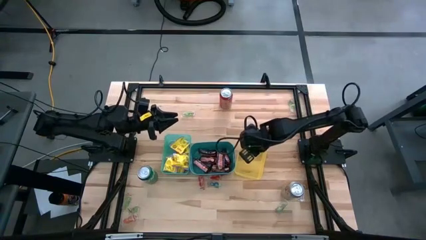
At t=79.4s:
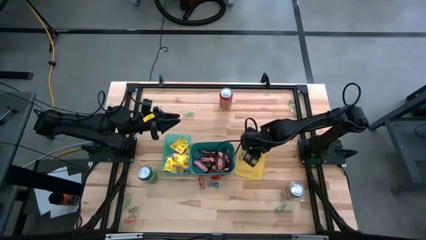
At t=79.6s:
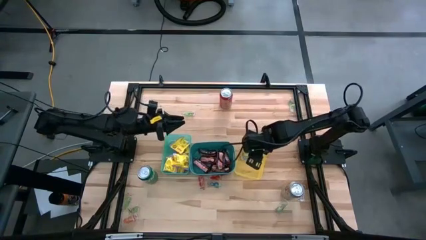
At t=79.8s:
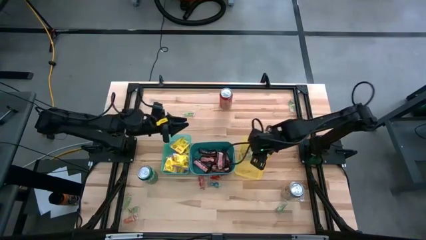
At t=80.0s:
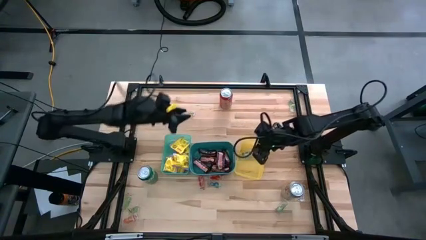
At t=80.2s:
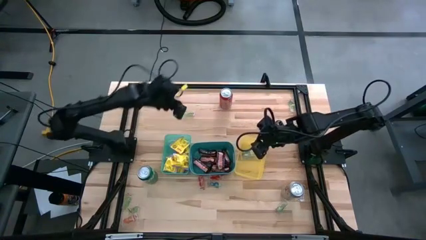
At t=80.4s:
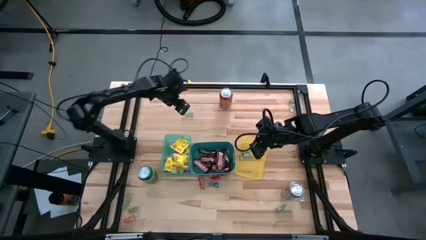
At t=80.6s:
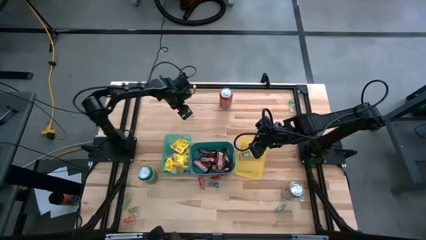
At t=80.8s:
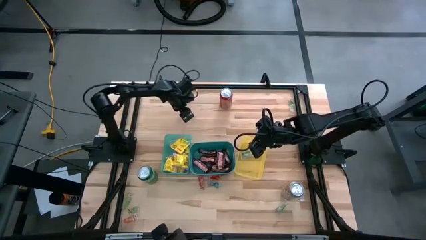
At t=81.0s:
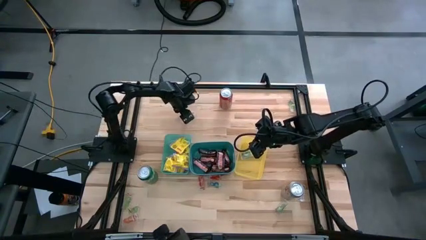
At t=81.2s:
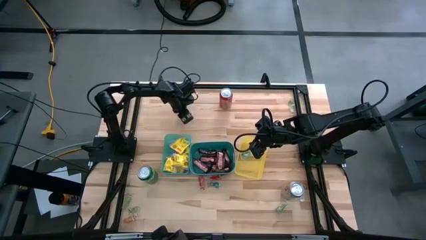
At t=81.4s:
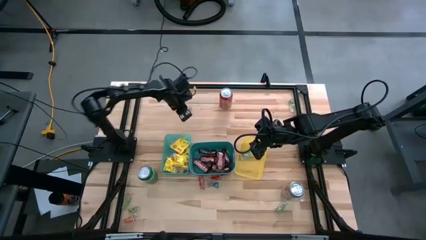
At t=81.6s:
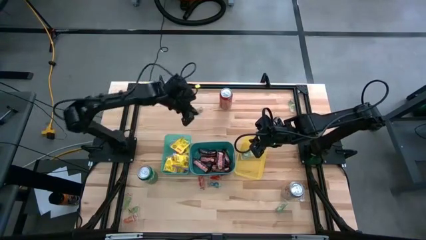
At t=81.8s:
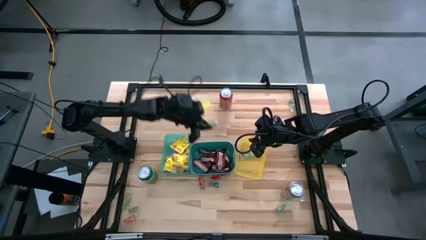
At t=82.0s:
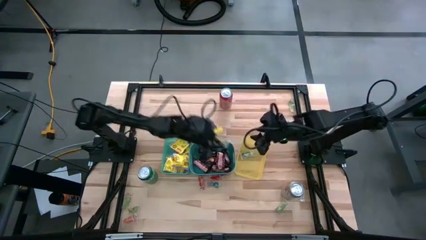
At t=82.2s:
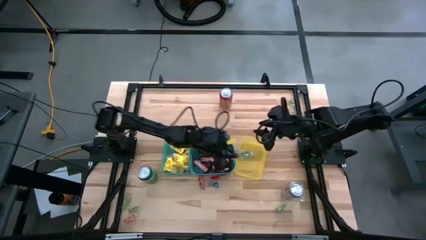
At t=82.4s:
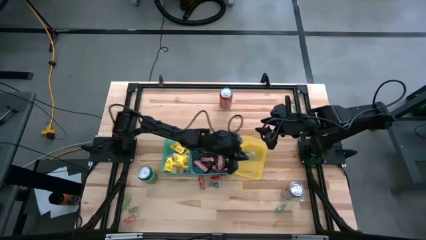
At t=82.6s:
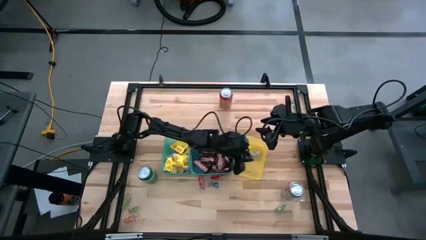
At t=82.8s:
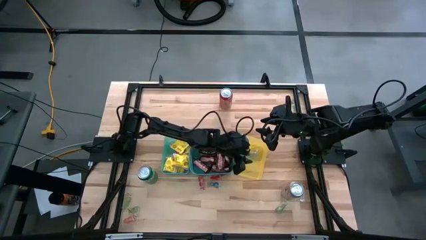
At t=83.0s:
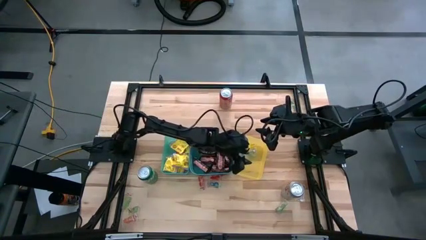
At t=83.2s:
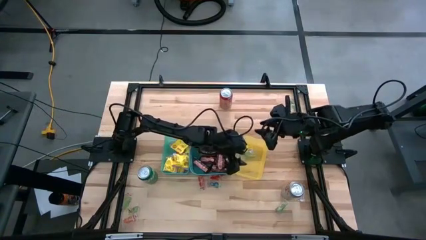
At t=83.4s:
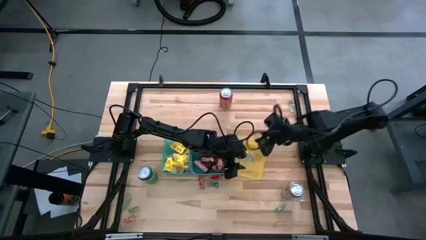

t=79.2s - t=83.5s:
Task: Sort candy
Put the green gummy into the yellow bin

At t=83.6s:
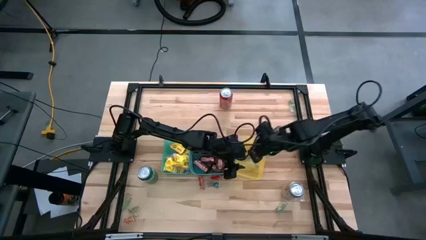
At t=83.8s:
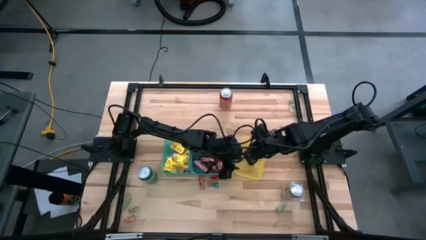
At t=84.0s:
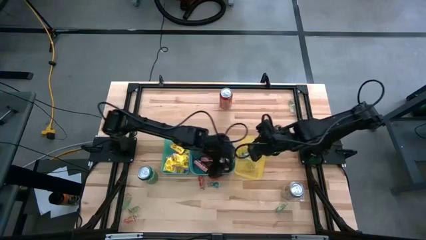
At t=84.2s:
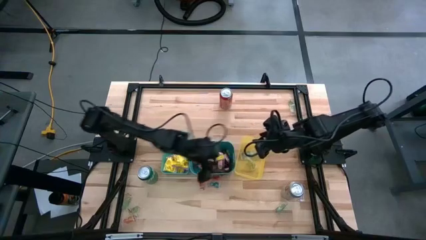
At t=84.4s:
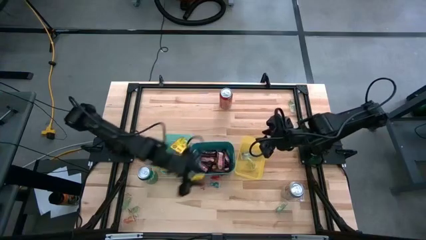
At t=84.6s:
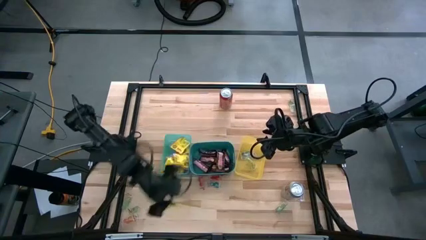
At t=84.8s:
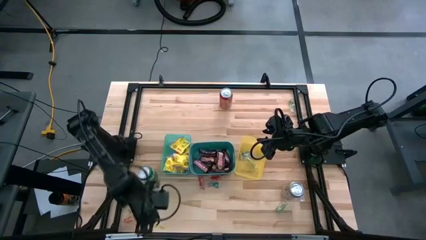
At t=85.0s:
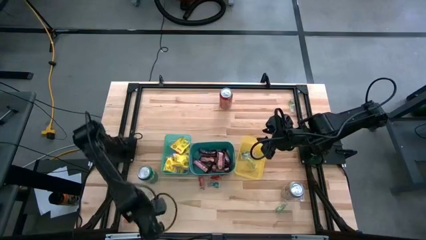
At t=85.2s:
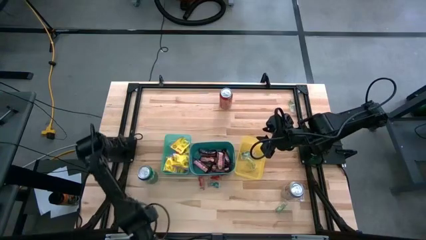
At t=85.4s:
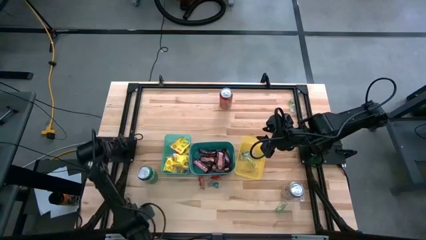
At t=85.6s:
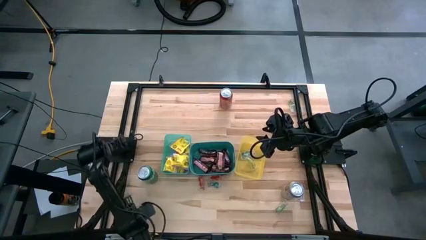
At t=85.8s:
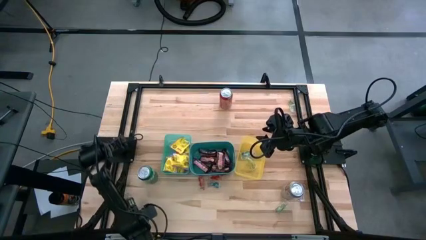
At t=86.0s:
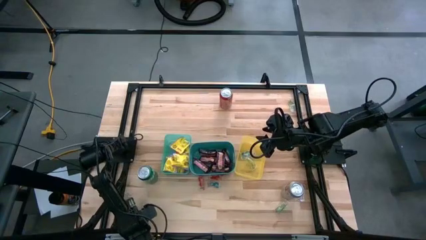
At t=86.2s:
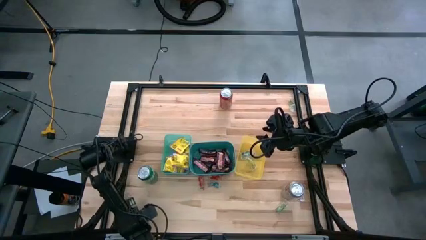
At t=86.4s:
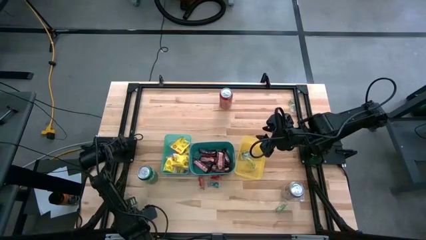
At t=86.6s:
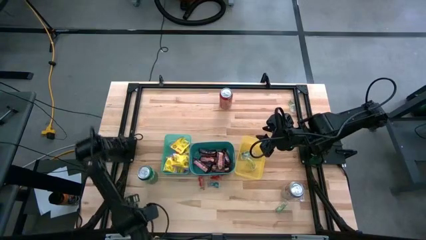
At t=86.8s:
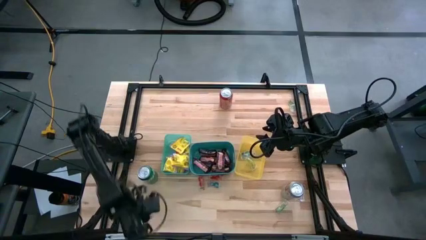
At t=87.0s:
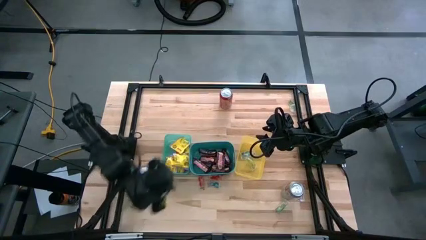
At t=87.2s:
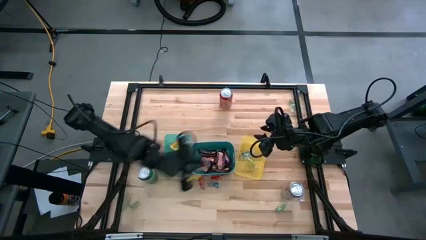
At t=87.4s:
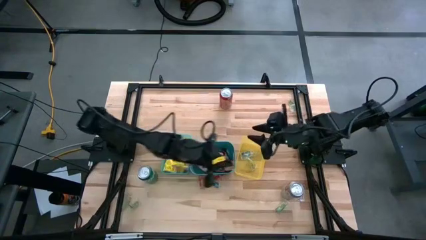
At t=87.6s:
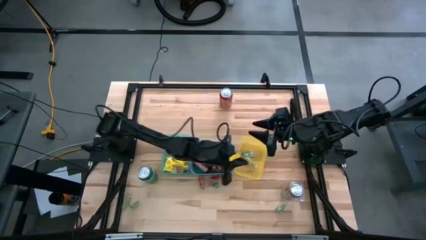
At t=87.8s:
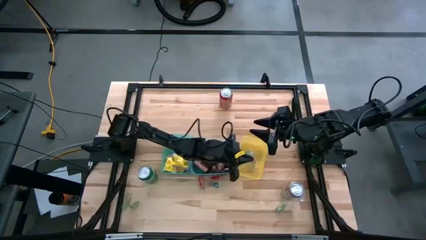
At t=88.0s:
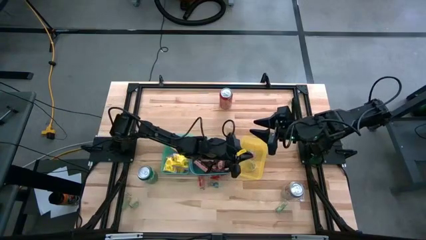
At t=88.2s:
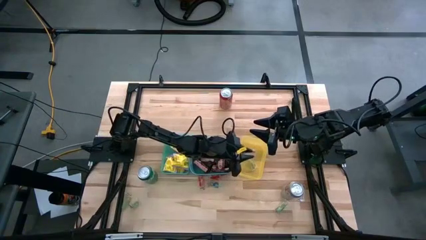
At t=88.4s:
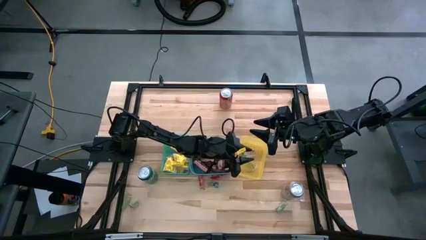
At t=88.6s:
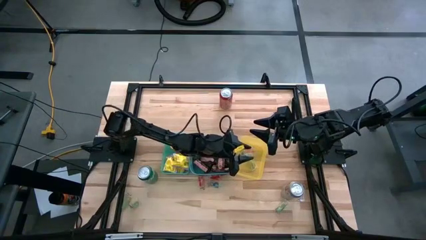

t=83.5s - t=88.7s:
Put the red gummy into the yellow bin

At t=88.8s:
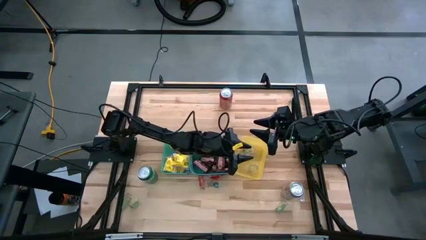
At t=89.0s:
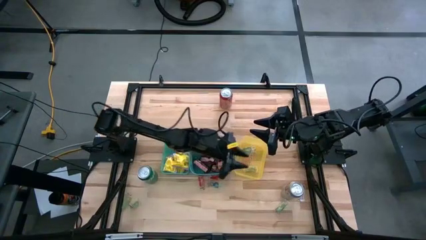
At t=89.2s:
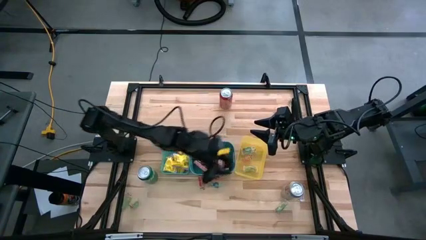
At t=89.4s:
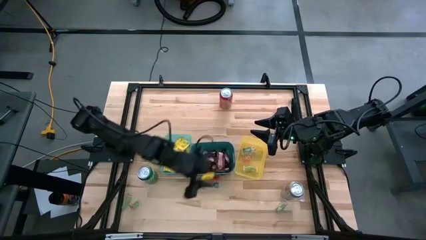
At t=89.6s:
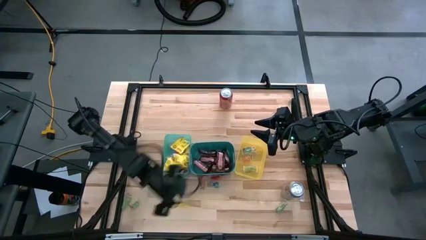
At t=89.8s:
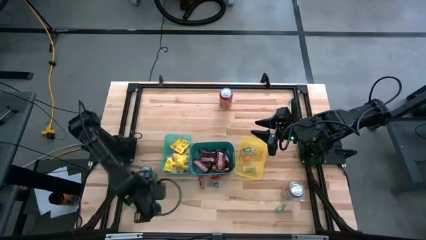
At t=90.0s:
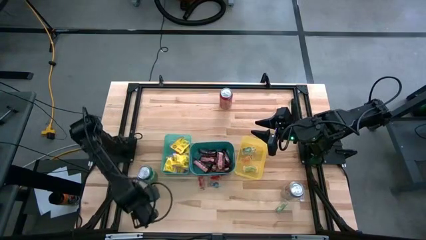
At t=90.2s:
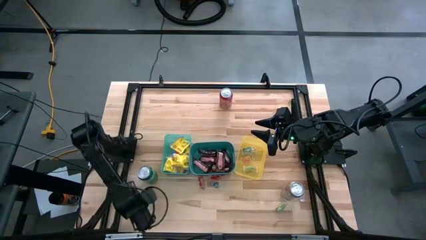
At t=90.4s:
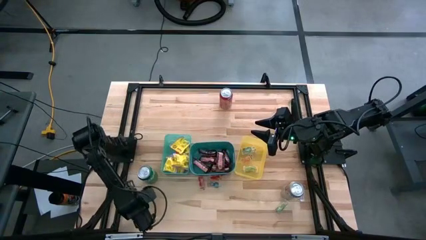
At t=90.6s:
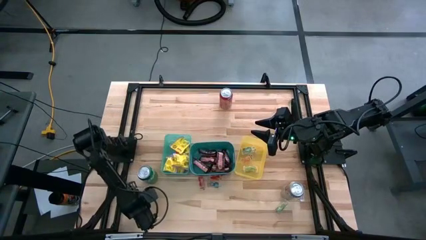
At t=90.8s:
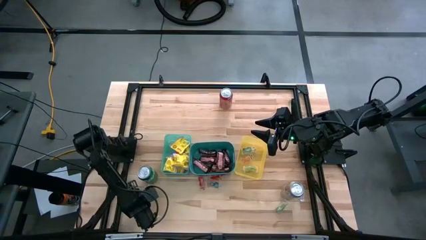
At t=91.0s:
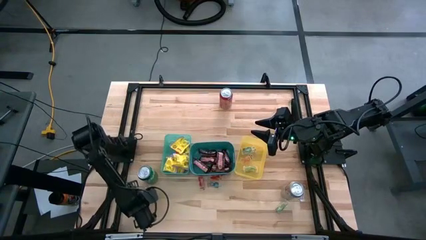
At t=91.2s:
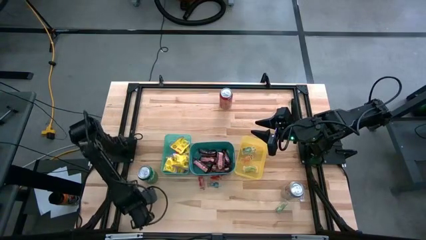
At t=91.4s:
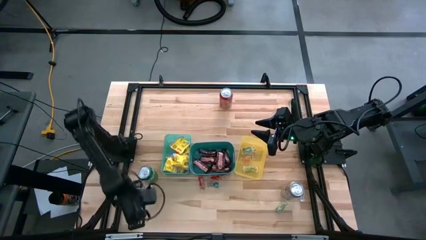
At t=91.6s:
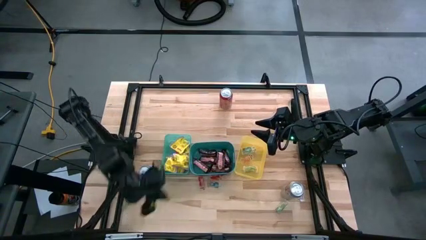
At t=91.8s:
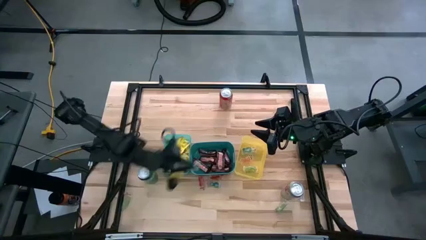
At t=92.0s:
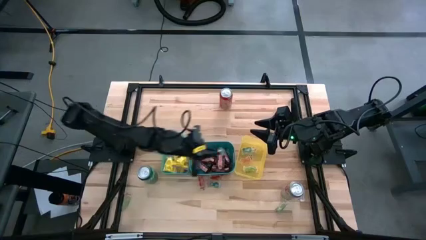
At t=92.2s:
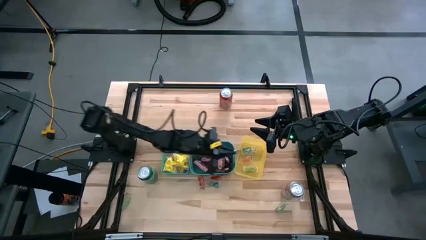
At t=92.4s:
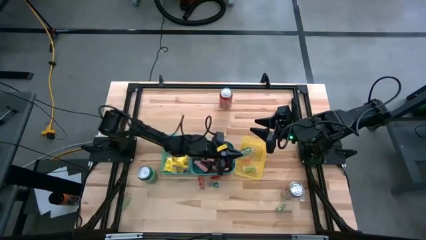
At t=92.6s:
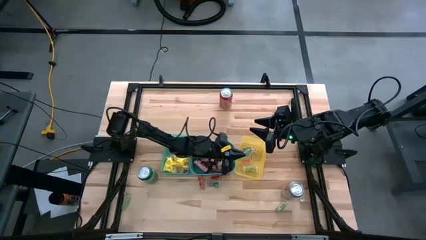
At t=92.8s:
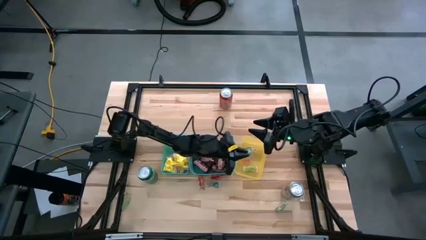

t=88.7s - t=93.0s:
Put the green gummy into the yellow bin

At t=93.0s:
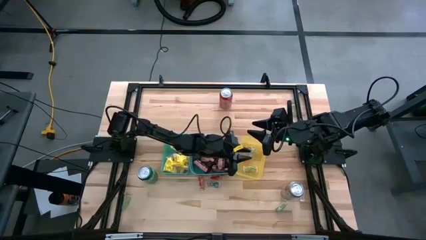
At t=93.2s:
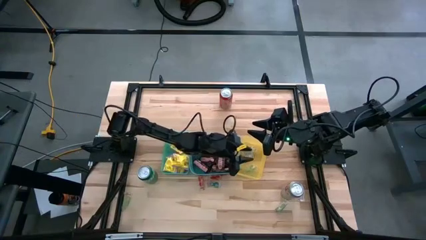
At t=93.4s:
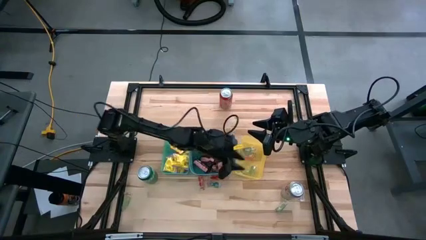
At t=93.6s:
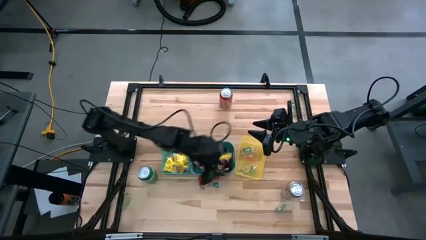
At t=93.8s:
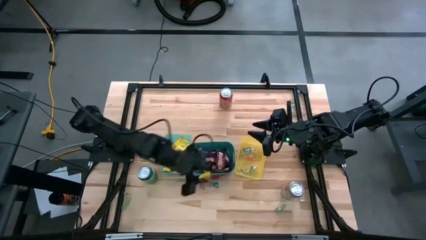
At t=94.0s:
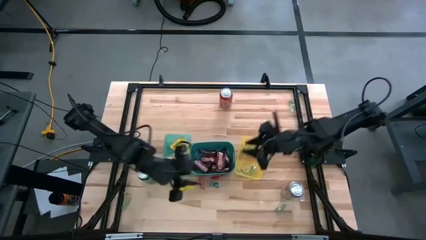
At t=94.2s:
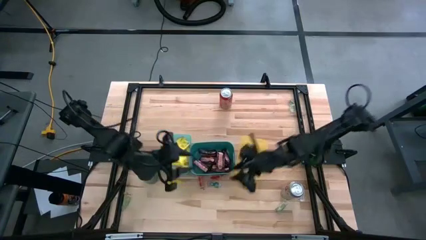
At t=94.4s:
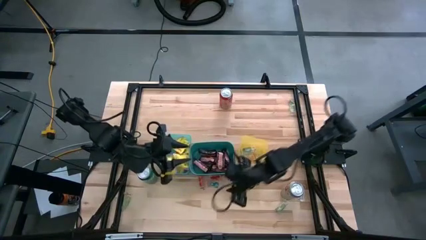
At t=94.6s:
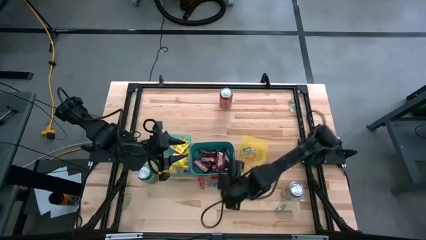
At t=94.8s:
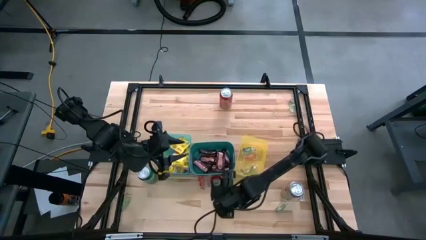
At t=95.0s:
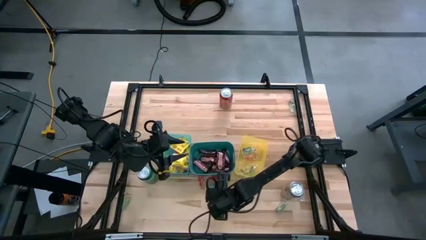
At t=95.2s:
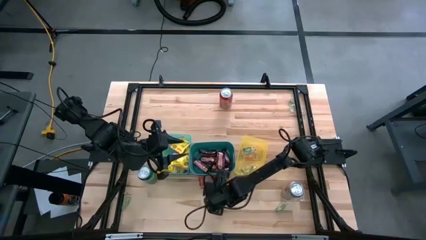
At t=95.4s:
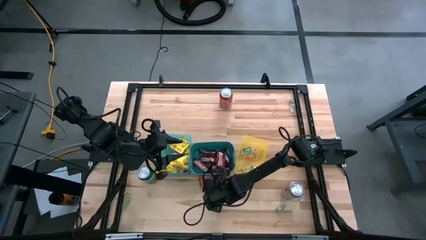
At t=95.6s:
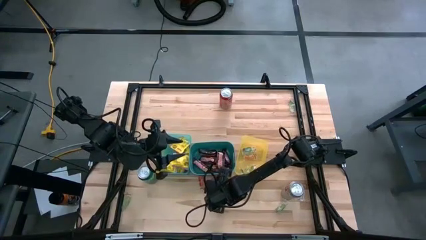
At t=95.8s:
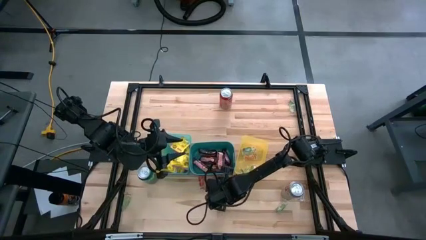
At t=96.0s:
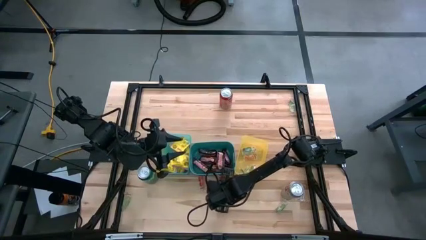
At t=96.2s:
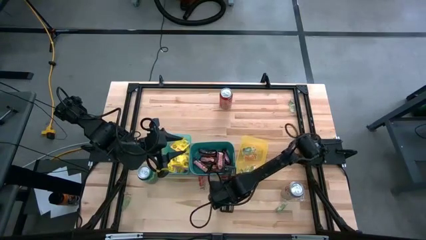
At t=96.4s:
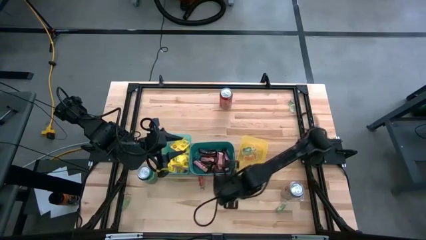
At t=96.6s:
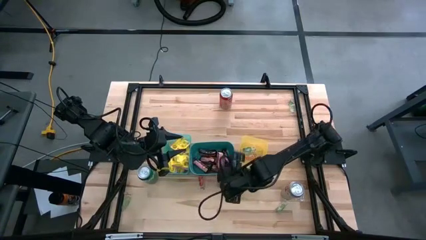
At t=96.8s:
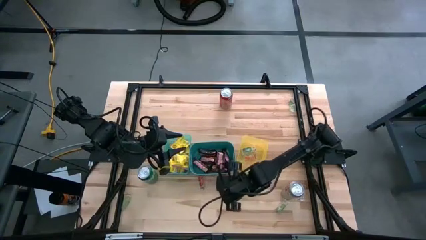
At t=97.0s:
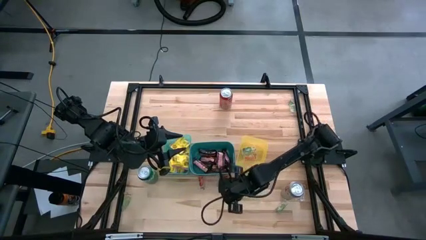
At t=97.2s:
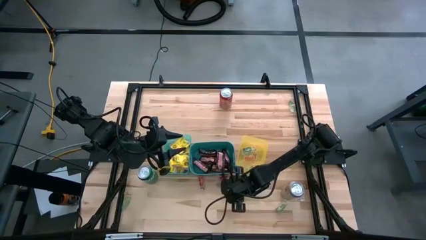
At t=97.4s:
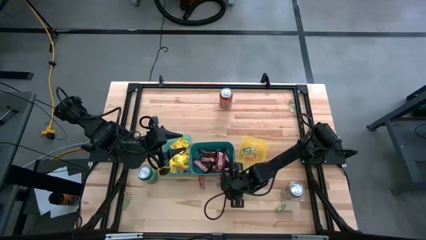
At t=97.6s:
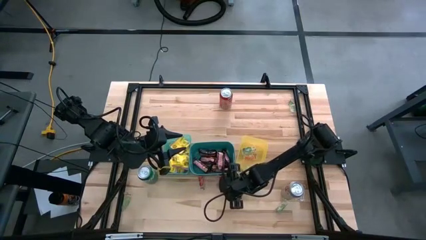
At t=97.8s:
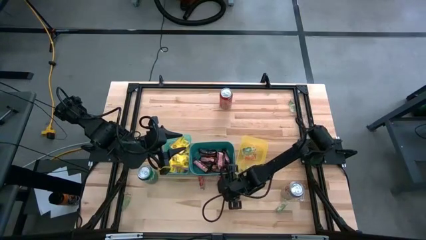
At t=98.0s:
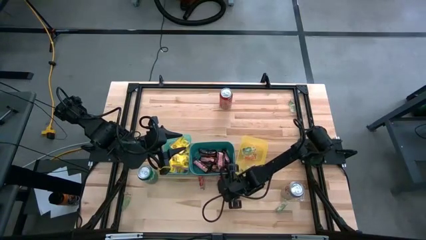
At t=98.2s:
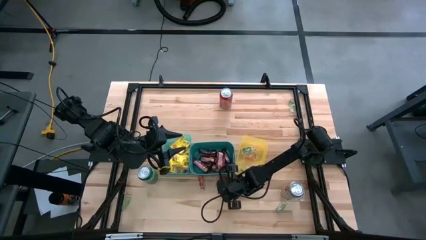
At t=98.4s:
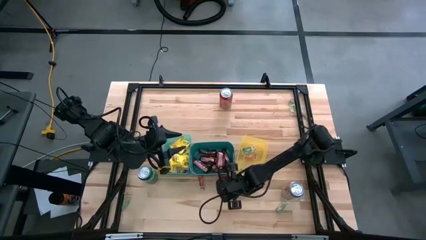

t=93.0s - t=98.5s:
Put the blue gummy into the yellow bin
